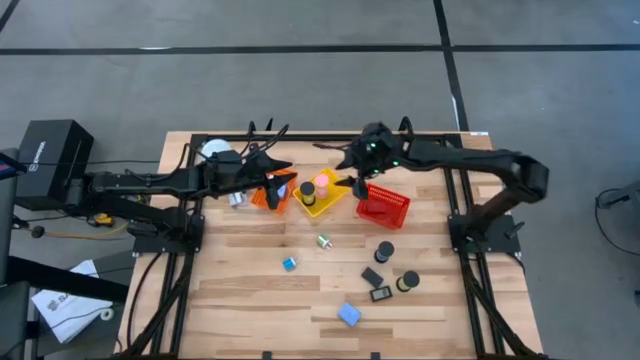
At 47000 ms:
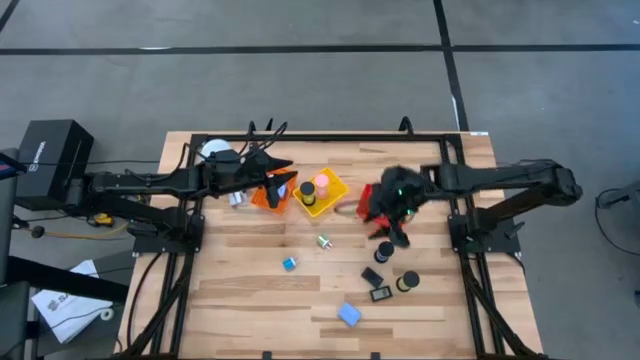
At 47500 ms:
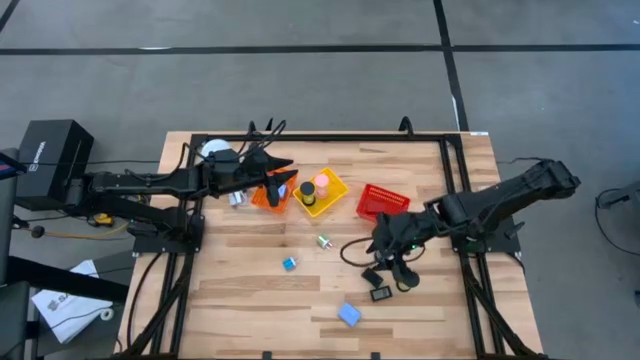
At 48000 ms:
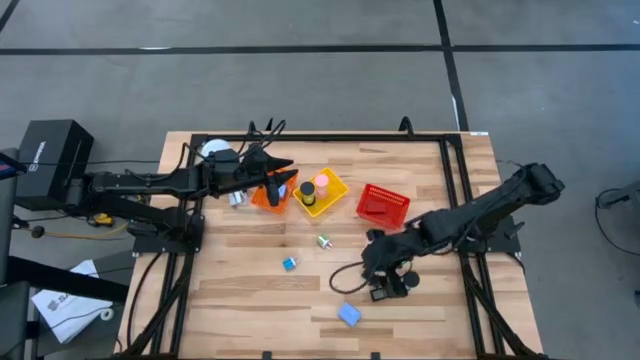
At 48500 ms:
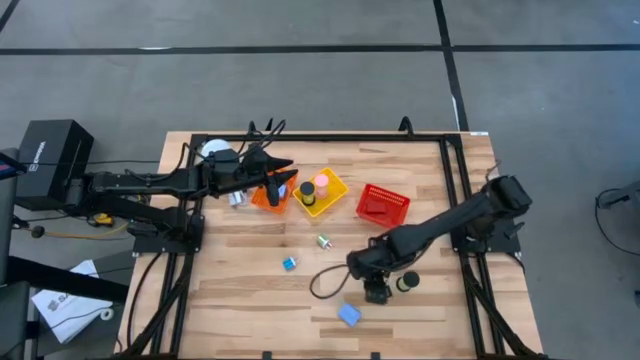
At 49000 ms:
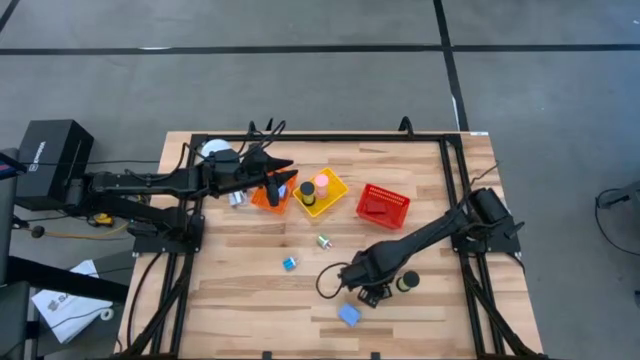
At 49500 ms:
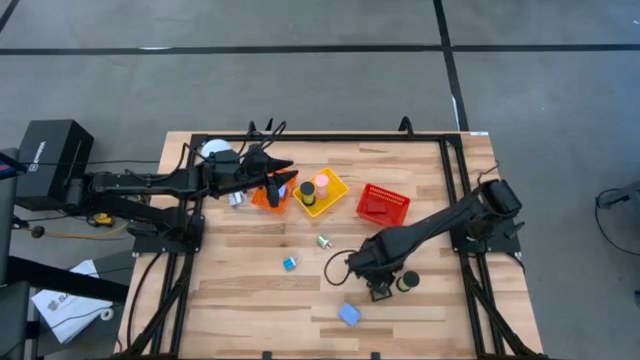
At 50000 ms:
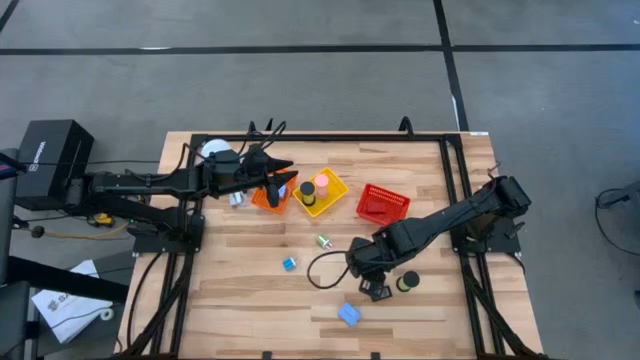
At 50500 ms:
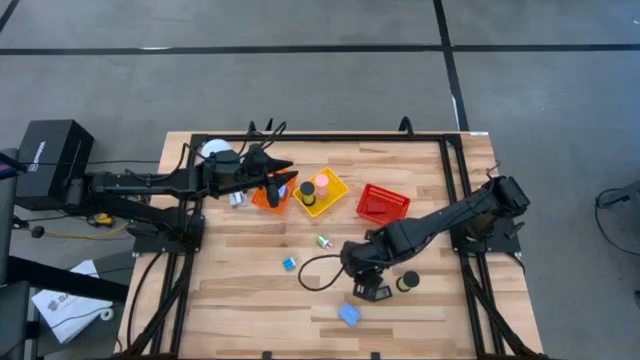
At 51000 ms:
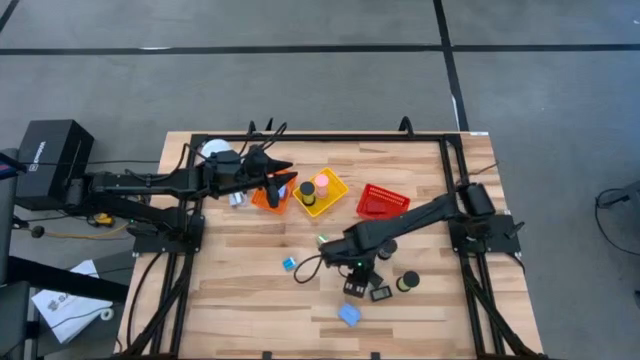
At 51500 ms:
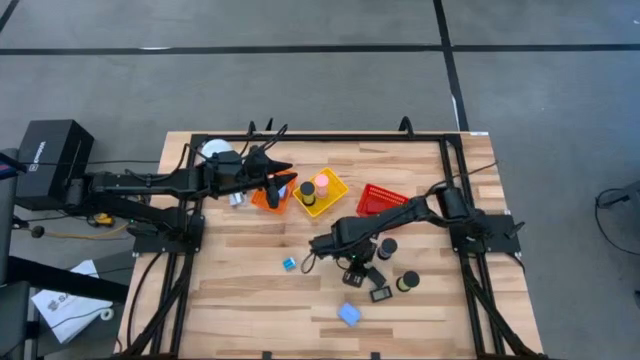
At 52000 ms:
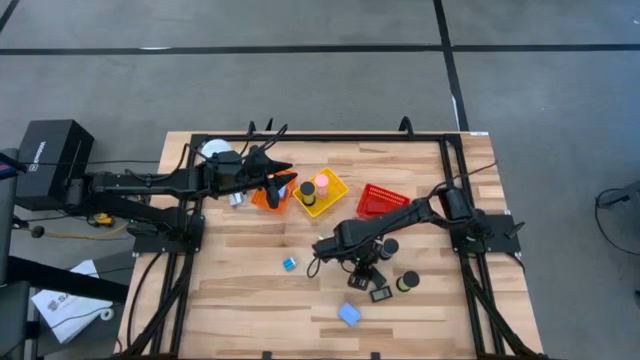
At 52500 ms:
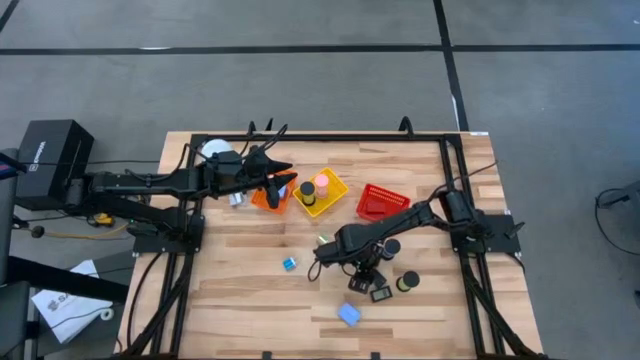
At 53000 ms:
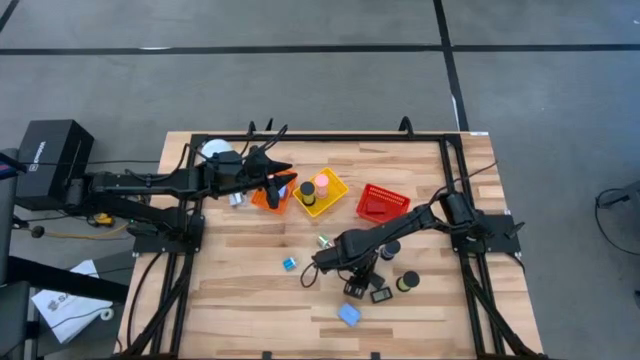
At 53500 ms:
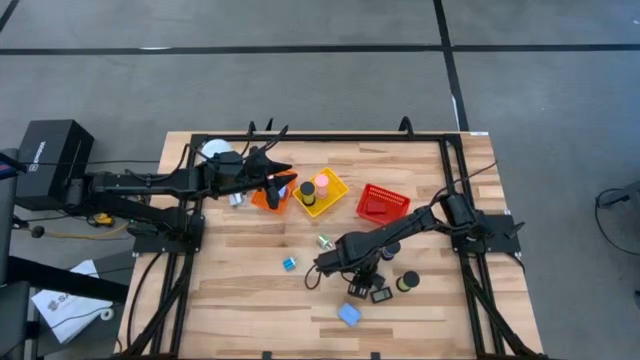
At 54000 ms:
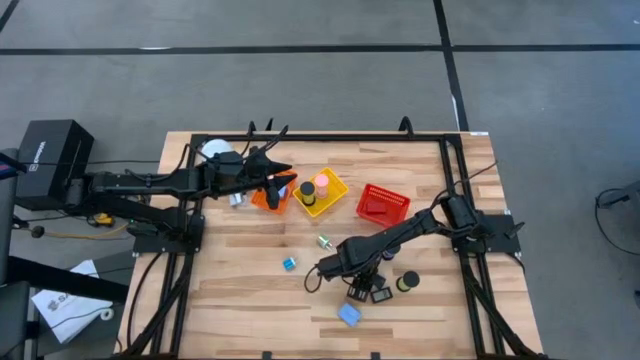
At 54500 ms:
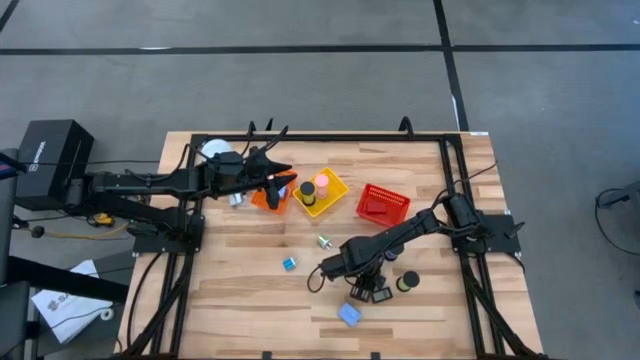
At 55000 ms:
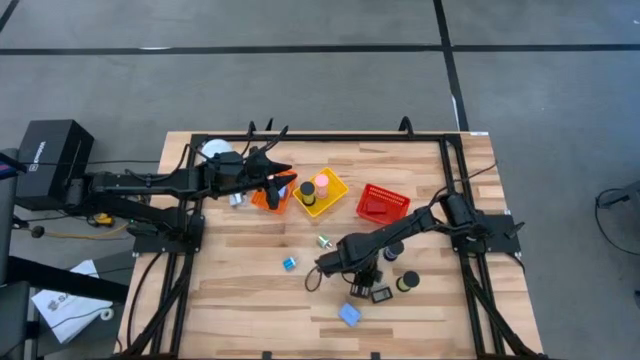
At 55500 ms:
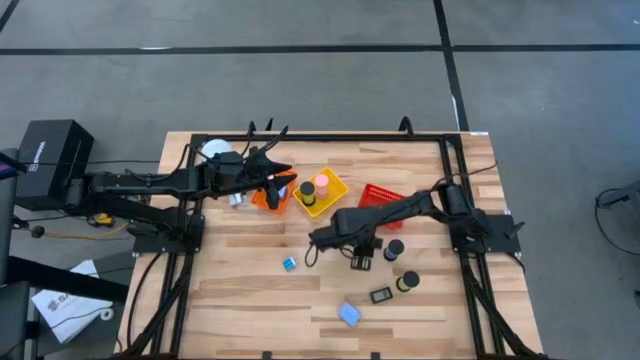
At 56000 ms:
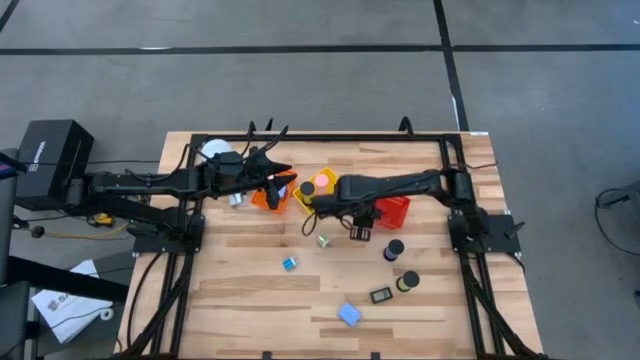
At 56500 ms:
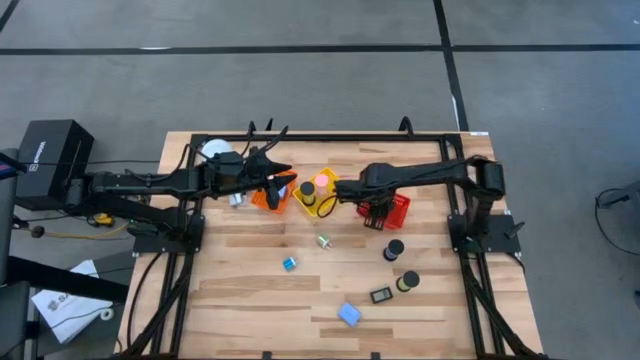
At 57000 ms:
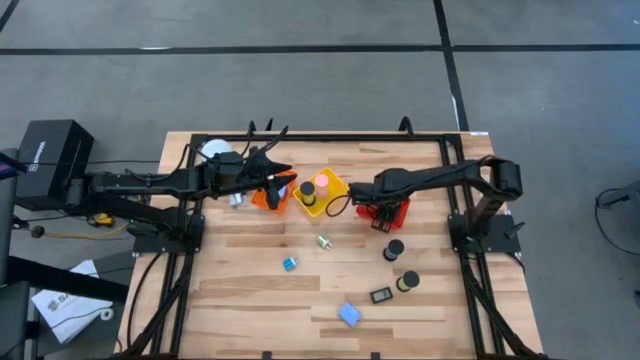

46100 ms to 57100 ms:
Task: Pick & Place Office items
Put the top black timer in the red bin

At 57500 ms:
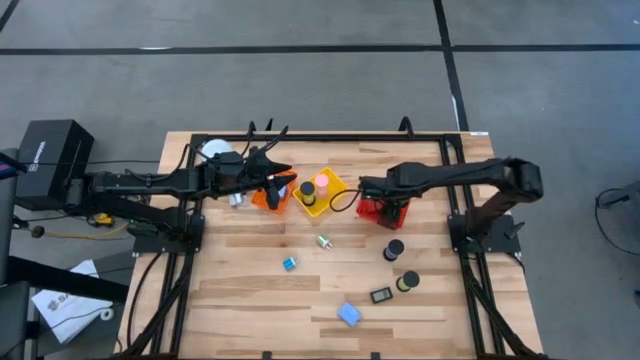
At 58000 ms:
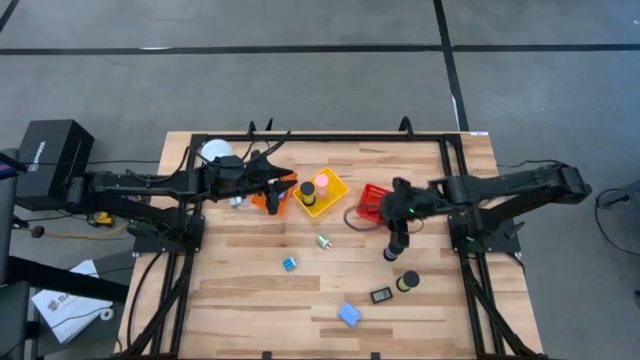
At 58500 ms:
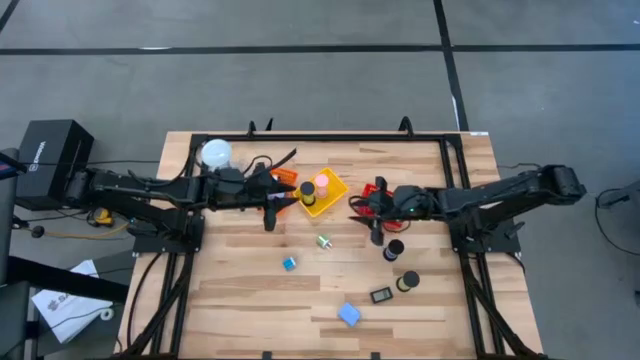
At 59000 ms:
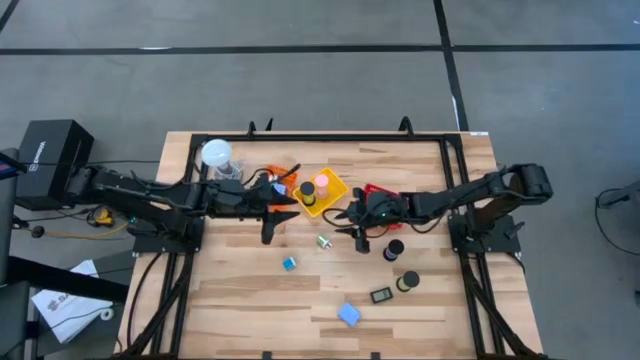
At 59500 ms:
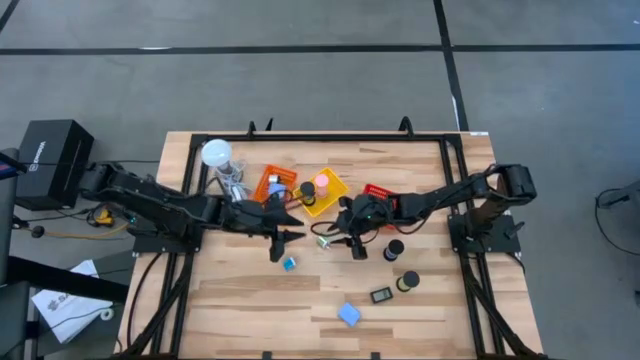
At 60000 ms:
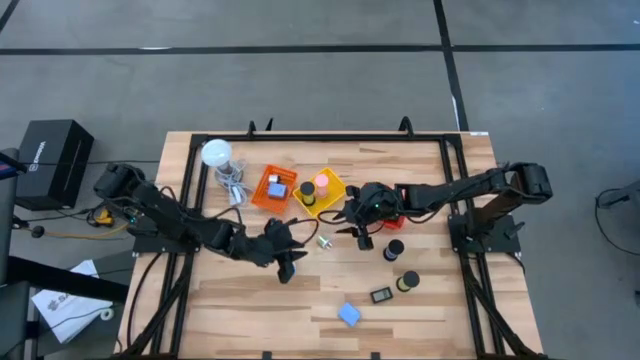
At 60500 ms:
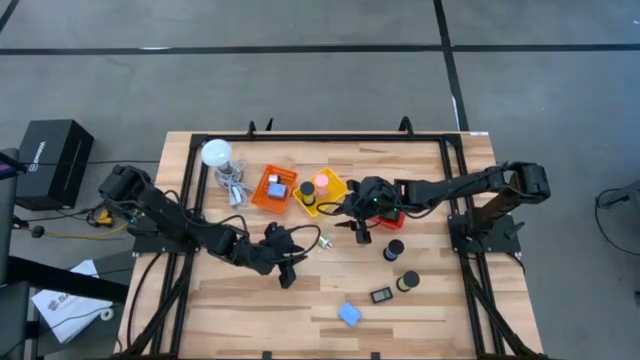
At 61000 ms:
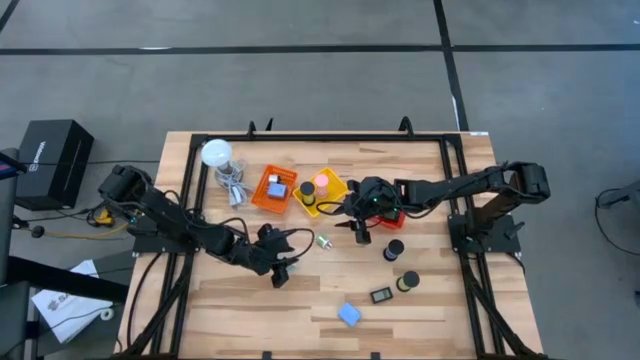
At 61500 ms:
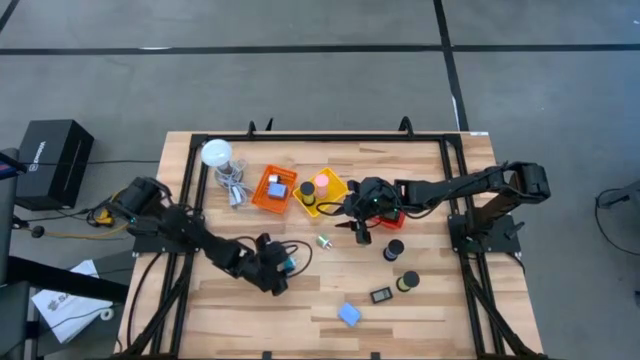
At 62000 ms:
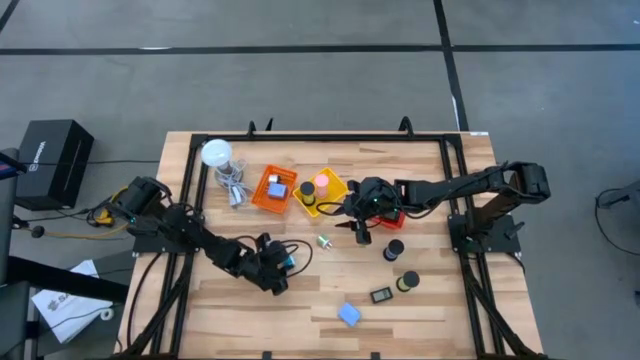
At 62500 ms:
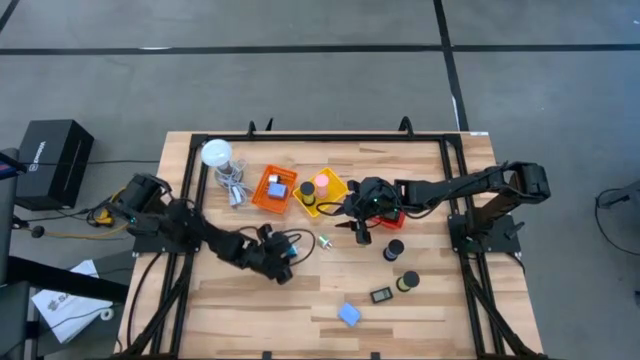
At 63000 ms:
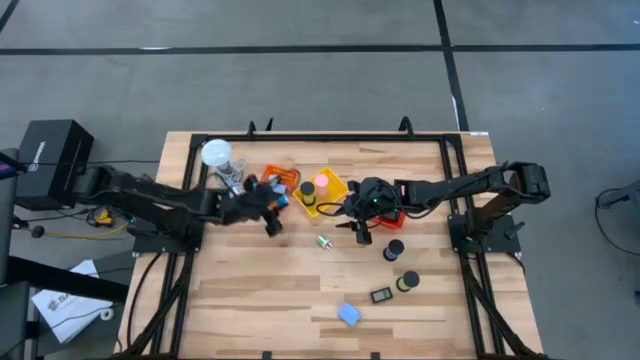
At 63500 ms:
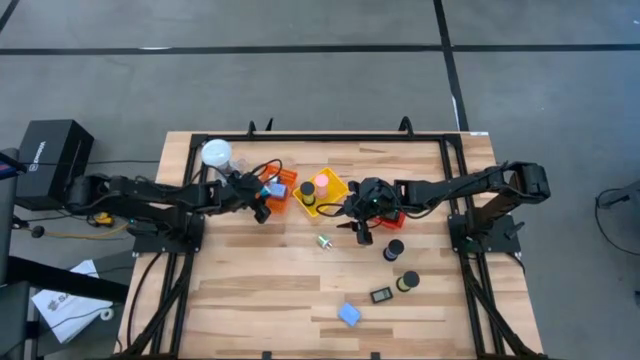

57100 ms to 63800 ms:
Put the blue and white charger adapter in the orange bin

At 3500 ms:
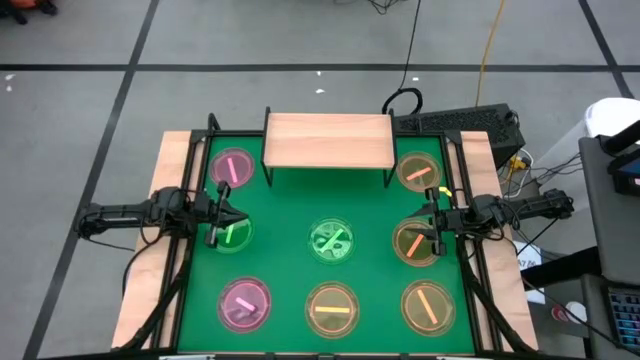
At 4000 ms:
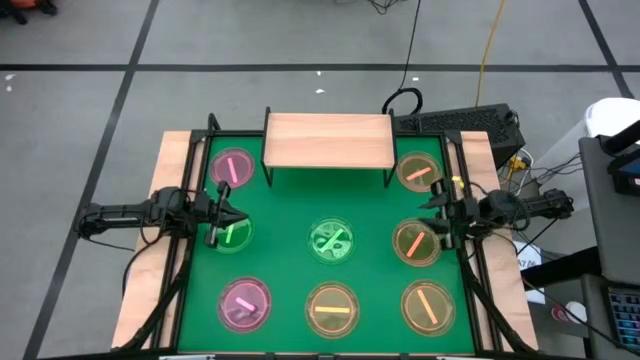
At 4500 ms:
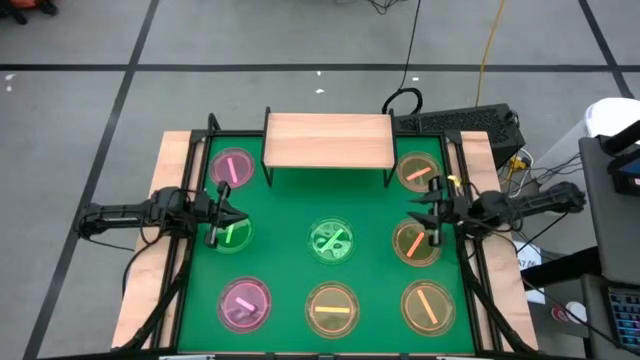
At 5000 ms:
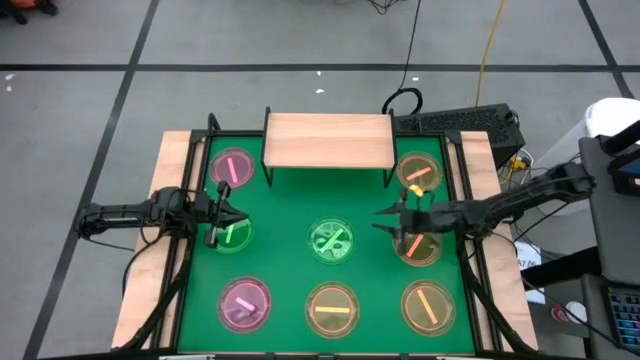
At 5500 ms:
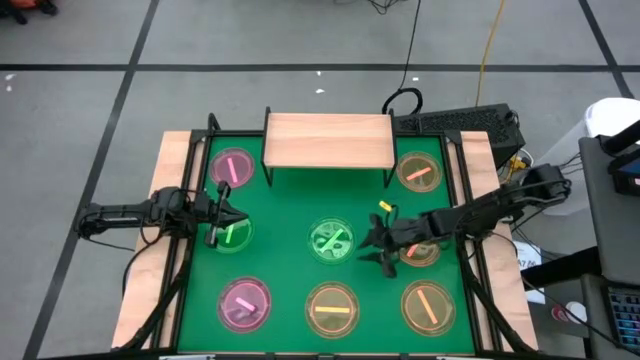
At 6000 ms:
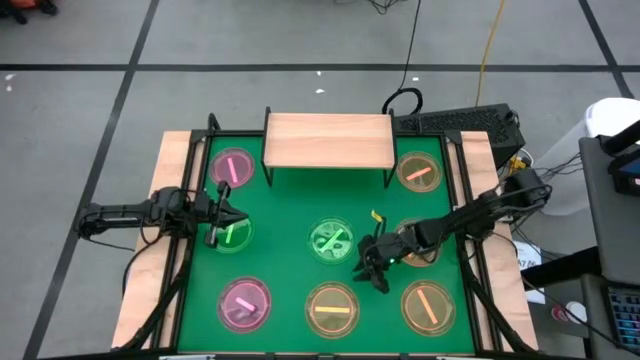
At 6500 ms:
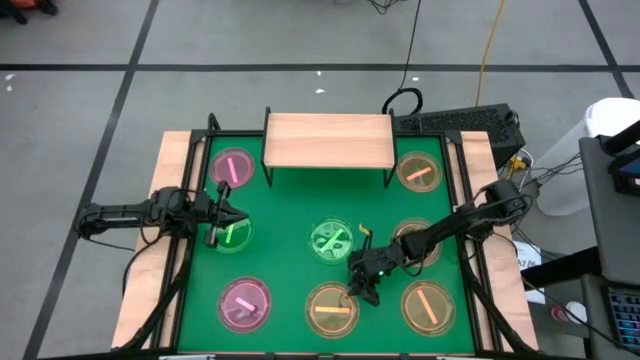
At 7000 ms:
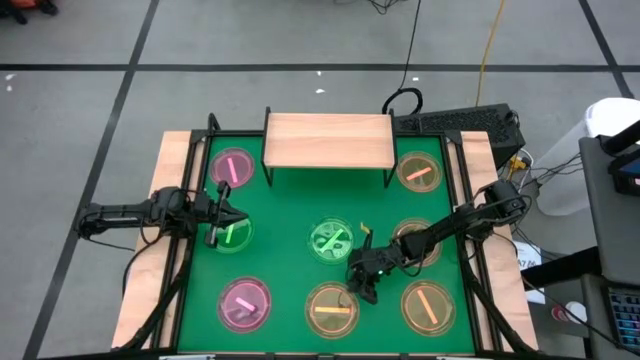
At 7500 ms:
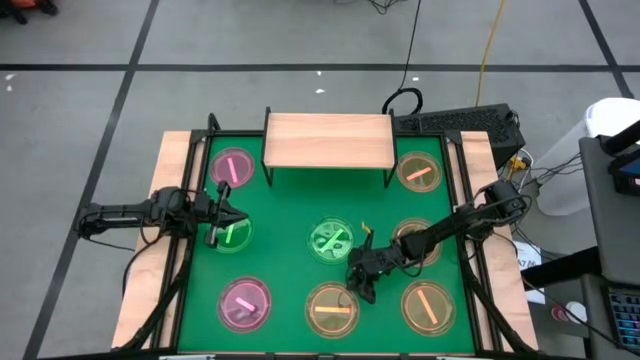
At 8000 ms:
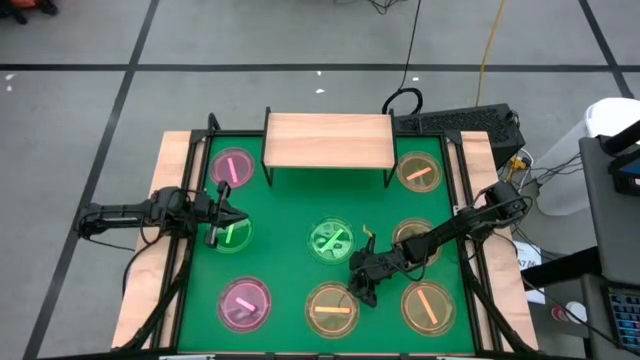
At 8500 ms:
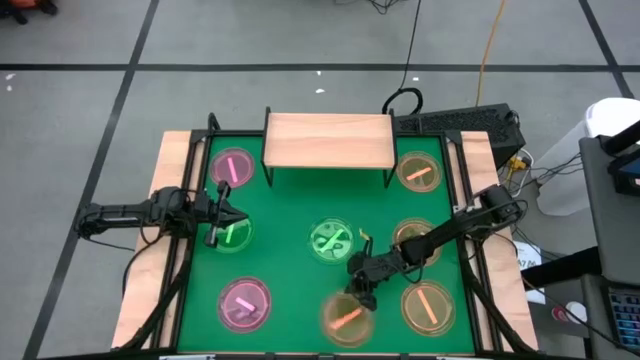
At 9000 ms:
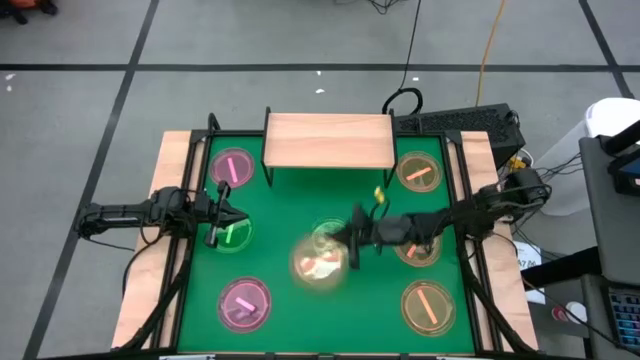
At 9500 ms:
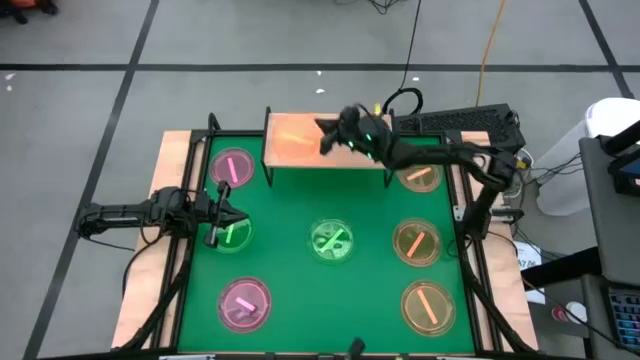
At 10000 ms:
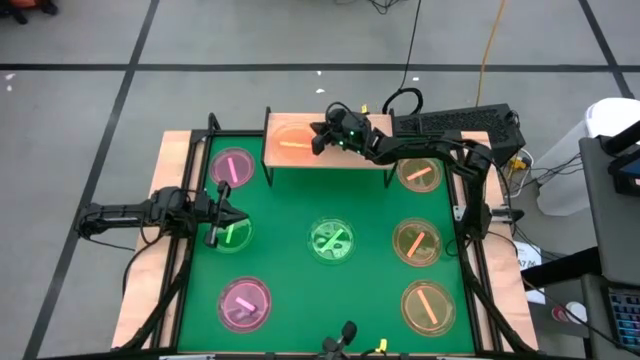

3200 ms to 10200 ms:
Task: Place and stack plates onto a shelf
Put the orange plate on the shelf
